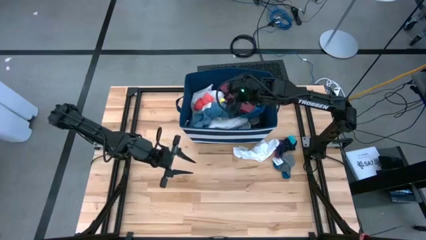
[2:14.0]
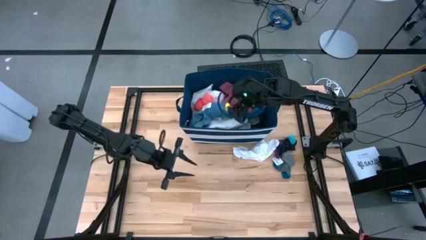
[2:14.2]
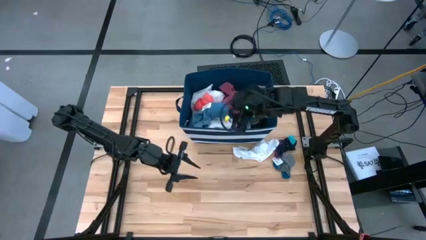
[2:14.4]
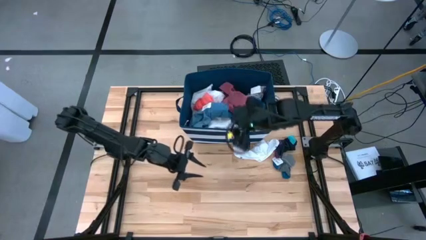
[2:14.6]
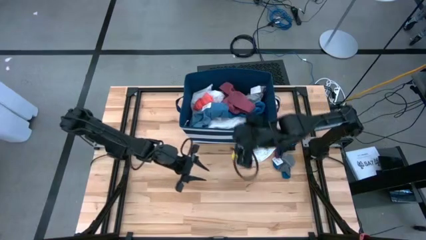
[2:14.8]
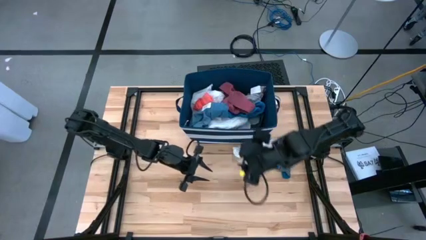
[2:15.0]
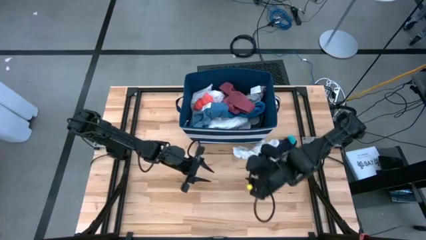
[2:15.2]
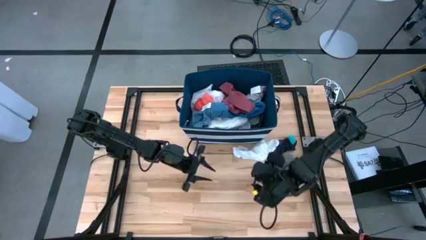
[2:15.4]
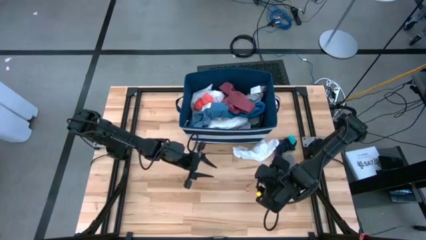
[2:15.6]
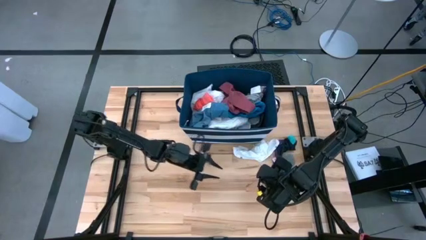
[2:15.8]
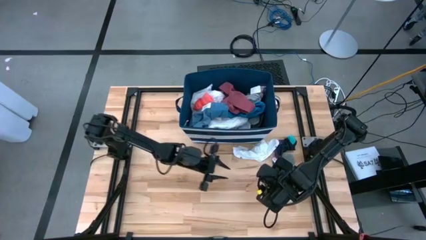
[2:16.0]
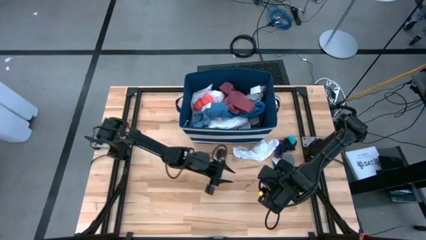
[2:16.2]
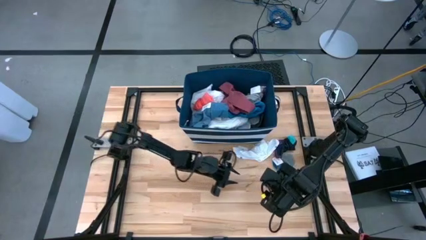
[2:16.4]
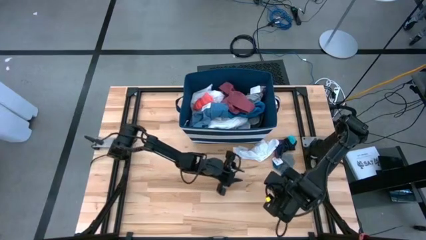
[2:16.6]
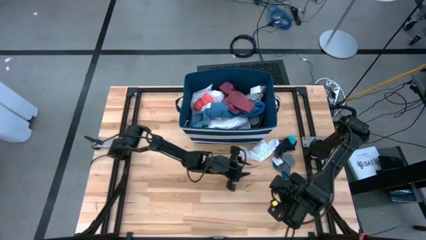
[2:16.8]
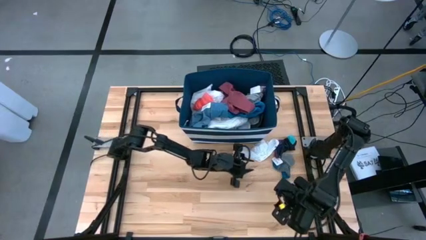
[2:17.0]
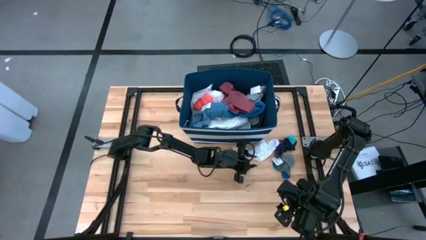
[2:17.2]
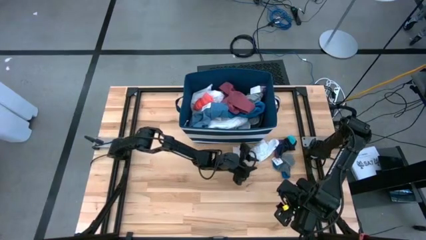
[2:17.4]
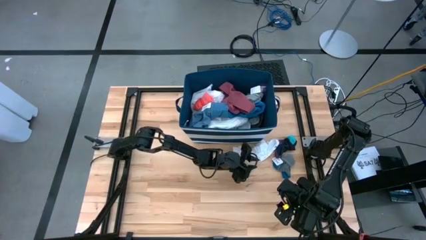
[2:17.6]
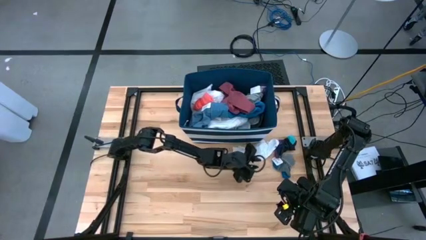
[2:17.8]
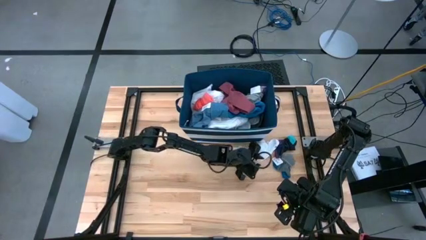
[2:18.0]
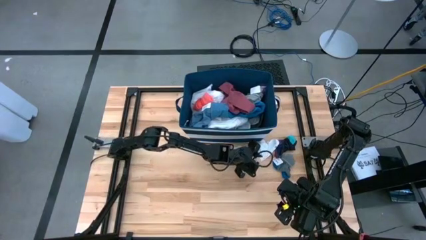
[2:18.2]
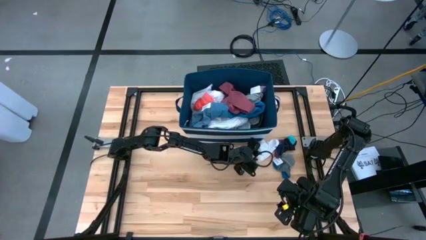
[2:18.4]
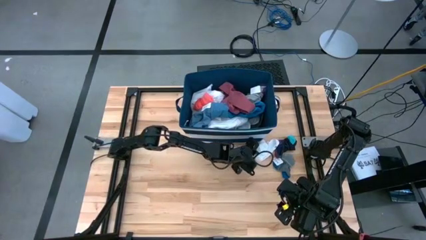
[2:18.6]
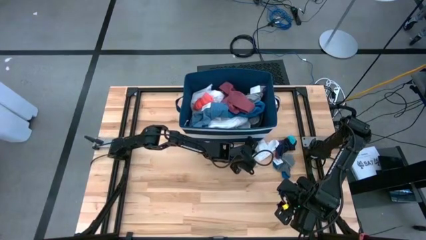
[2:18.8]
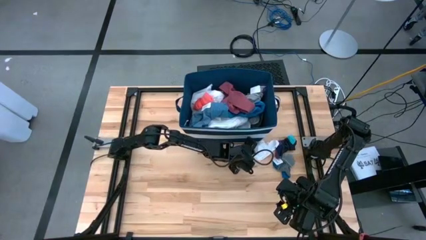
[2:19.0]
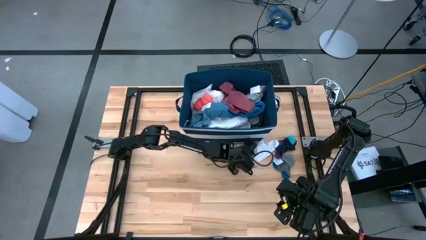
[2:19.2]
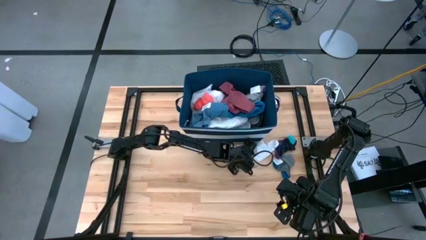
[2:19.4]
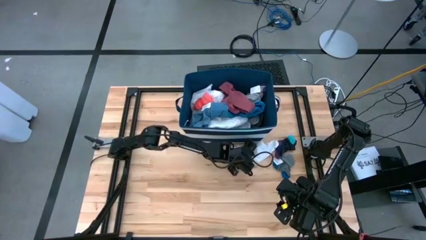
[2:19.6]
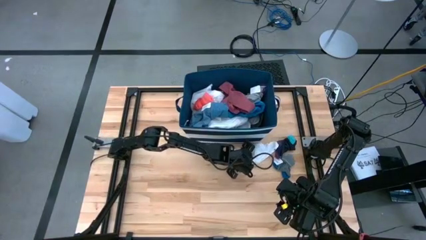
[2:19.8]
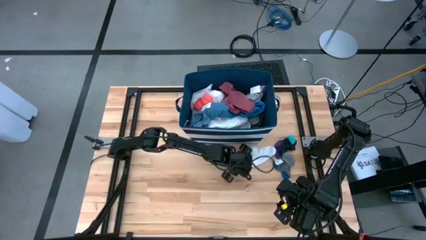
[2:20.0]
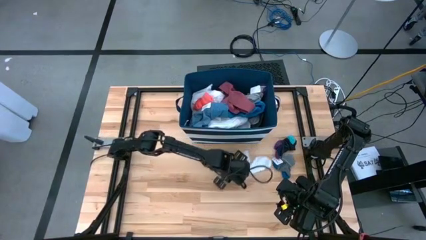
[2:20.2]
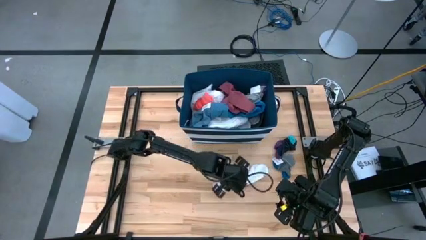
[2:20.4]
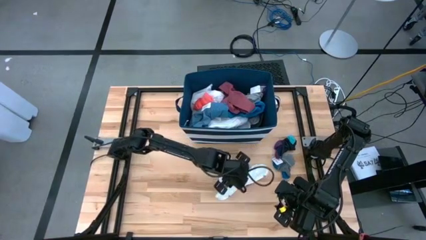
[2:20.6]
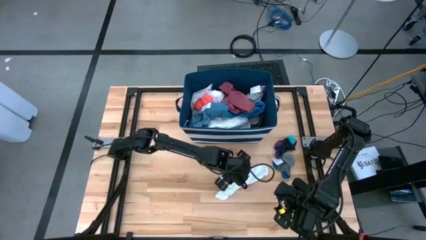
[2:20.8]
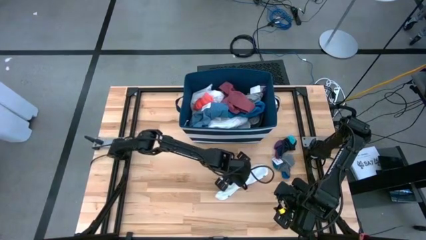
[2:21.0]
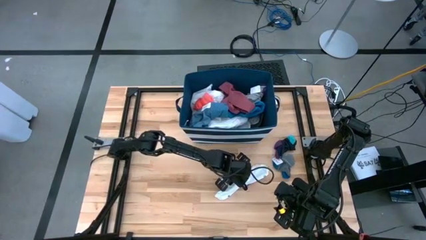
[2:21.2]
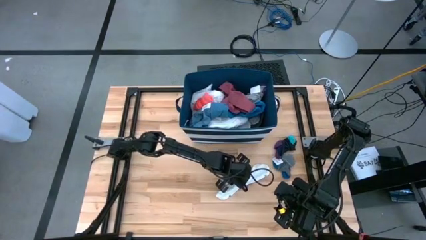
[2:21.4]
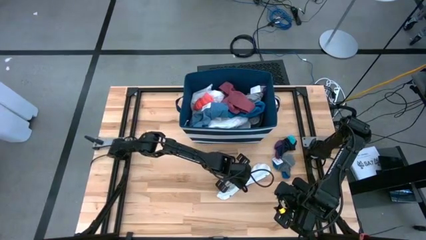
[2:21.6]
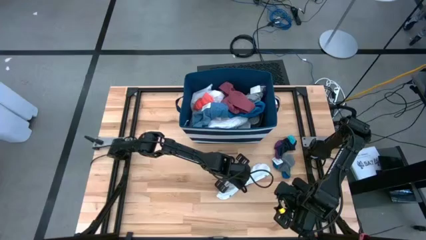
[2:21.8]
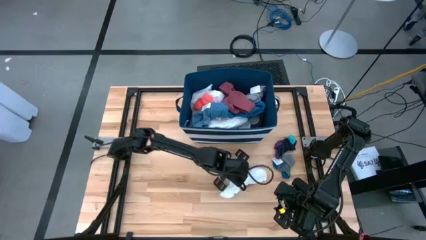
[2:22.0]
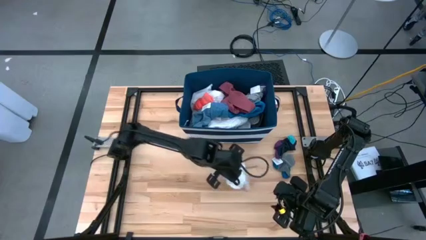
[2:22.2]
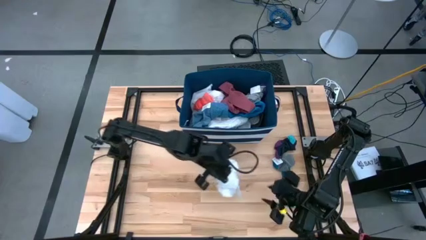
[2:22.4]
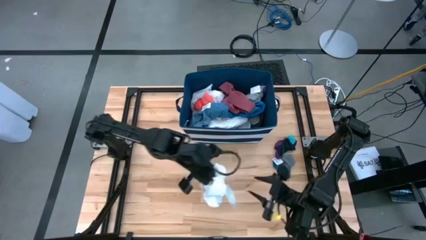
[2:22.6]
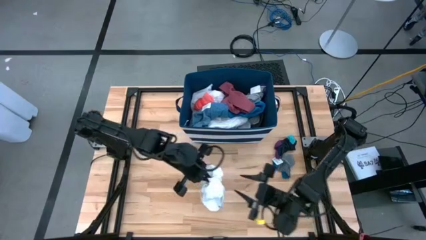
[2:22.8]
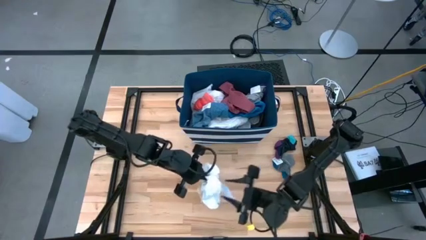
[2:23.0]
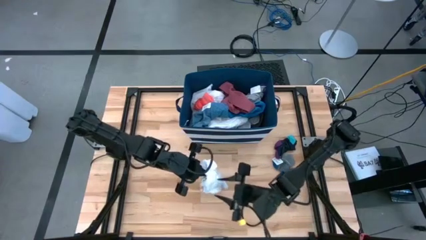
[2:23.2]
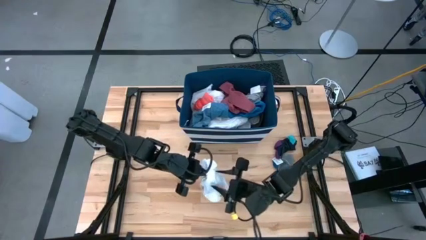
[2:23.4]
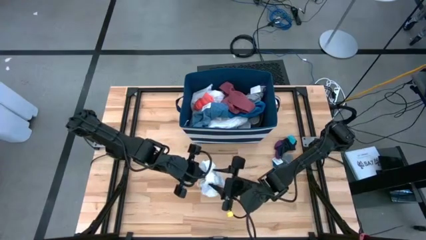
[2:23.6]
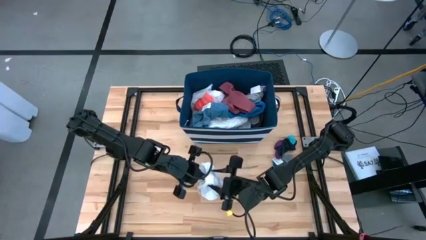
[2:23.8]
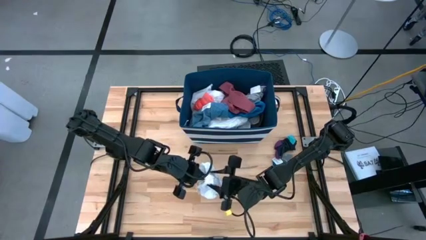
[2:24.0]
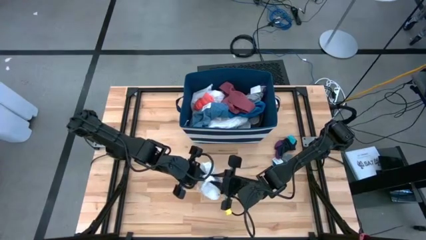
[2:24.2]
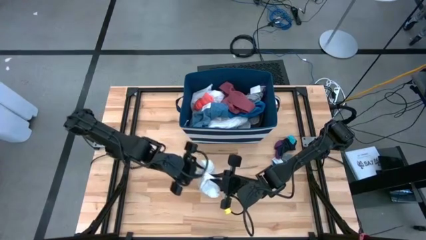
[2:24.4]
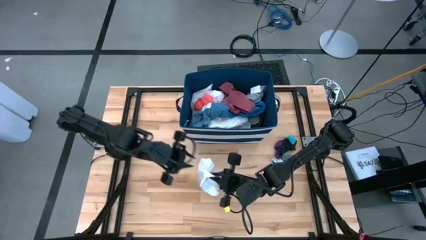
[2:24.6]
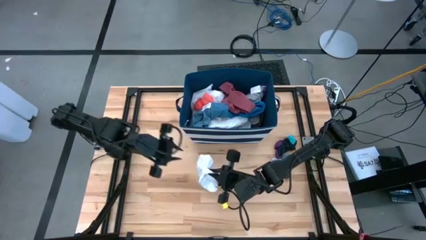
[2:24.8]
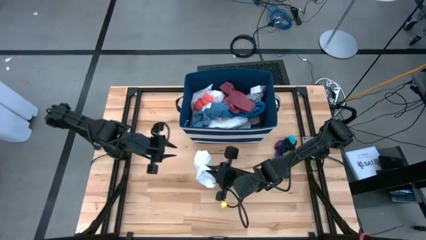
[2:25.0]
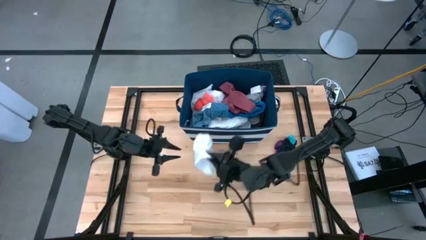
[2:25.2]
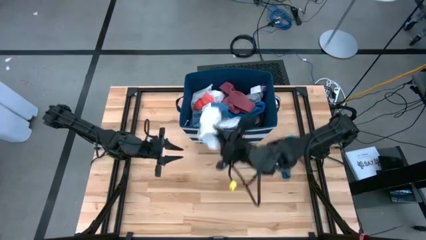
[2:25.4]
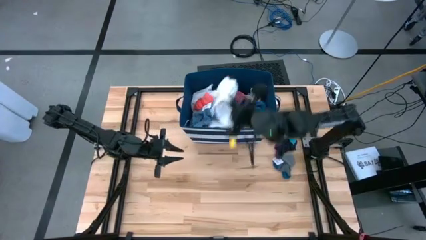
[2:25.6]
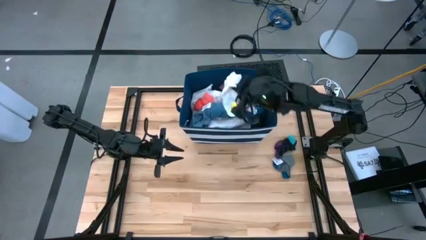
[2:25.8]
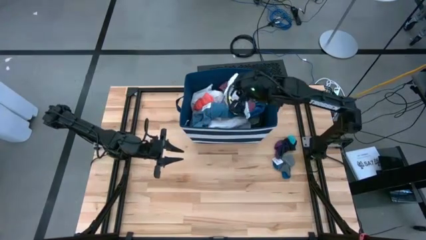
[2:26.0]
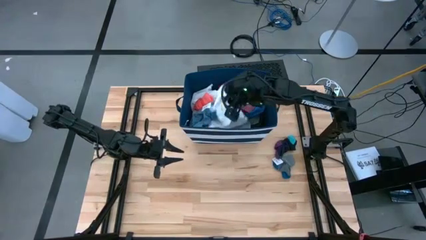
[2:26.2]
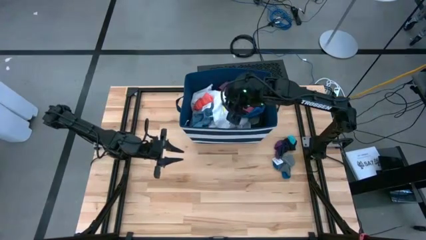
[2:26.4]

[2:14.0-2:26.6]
Task: Sort clothes
Put the white socks into the blue laundry organizer
